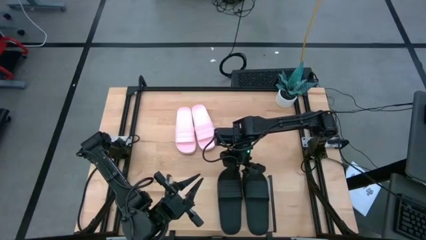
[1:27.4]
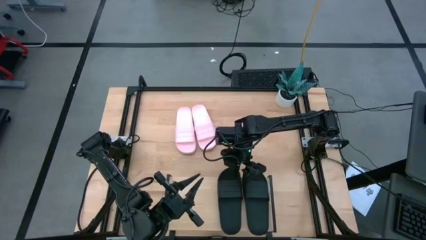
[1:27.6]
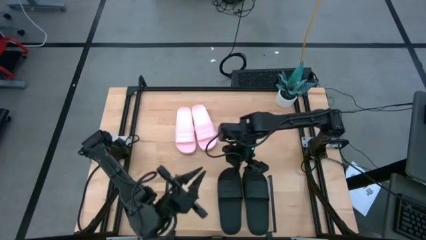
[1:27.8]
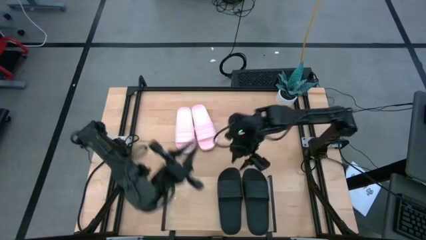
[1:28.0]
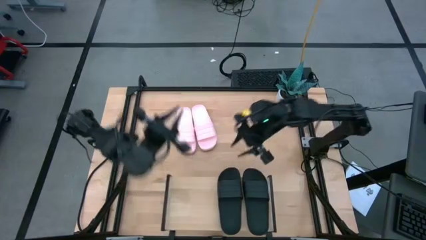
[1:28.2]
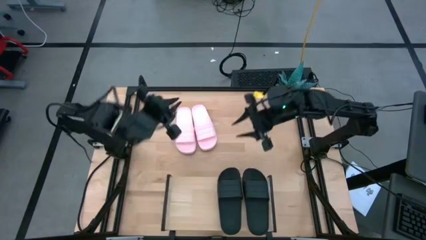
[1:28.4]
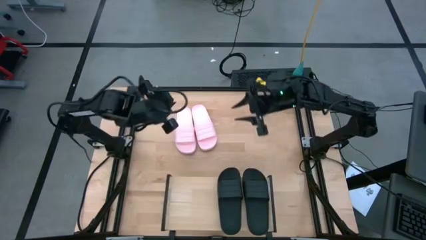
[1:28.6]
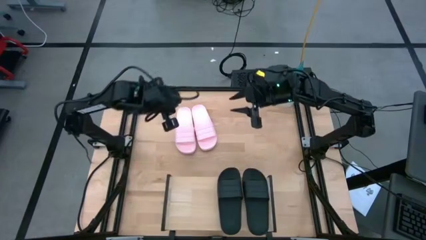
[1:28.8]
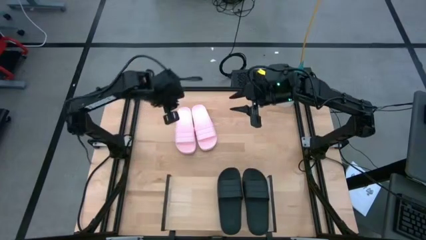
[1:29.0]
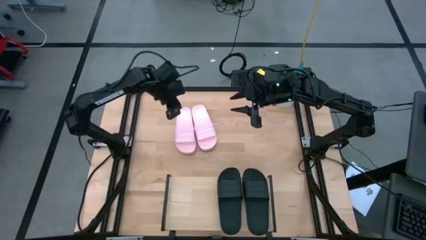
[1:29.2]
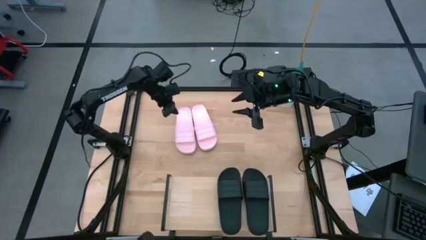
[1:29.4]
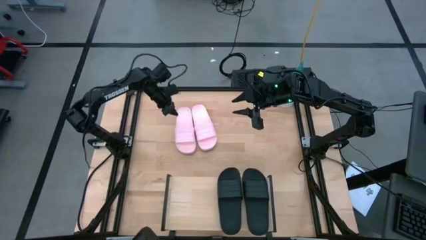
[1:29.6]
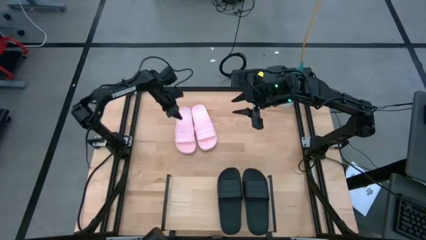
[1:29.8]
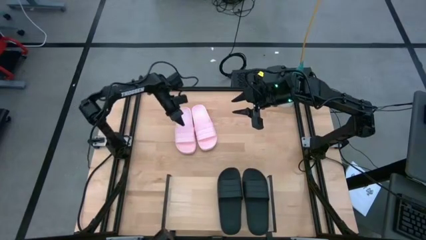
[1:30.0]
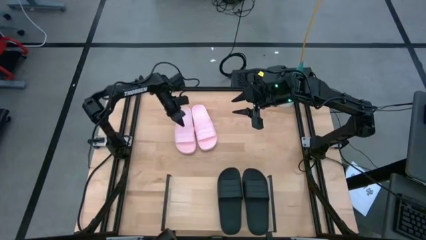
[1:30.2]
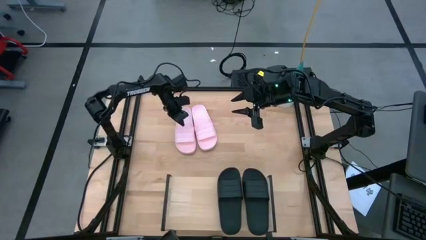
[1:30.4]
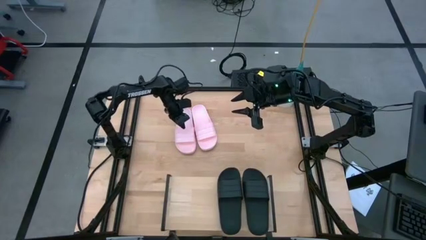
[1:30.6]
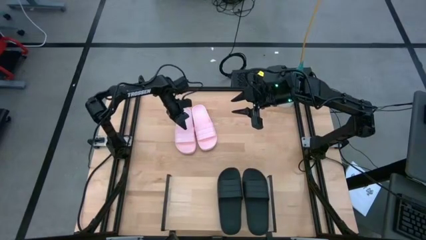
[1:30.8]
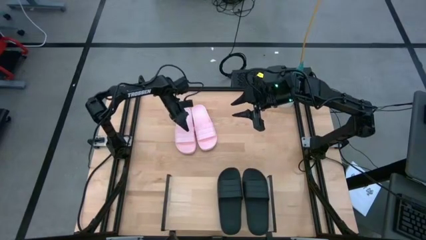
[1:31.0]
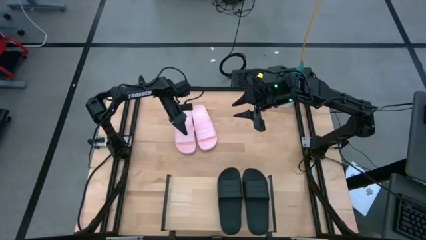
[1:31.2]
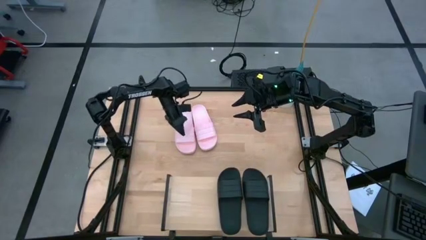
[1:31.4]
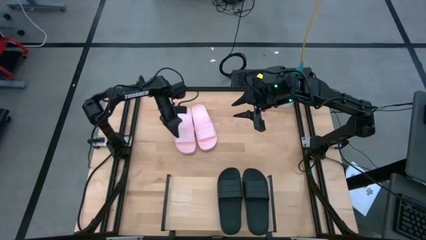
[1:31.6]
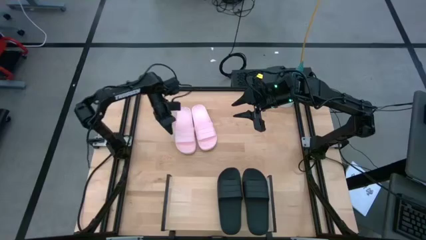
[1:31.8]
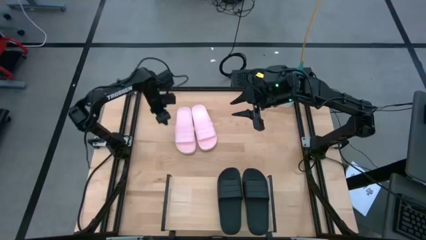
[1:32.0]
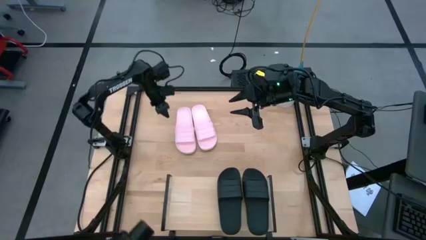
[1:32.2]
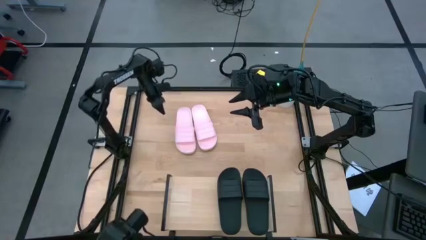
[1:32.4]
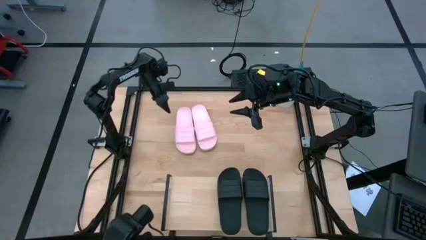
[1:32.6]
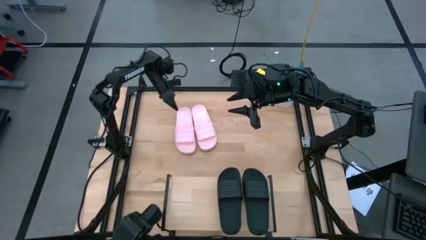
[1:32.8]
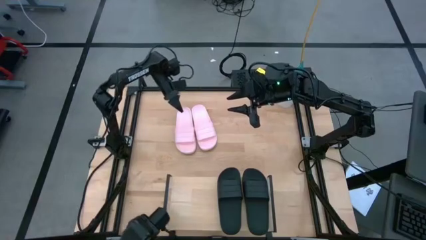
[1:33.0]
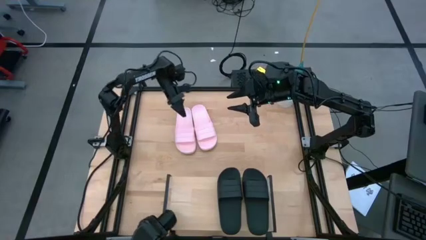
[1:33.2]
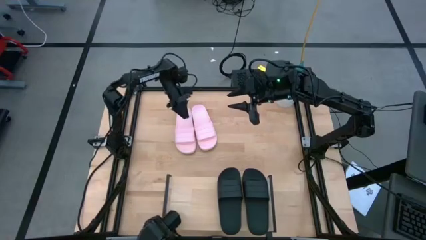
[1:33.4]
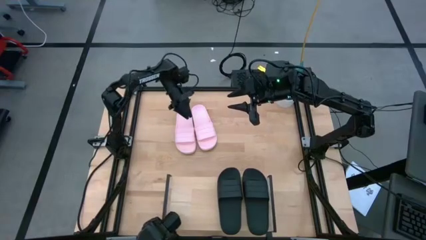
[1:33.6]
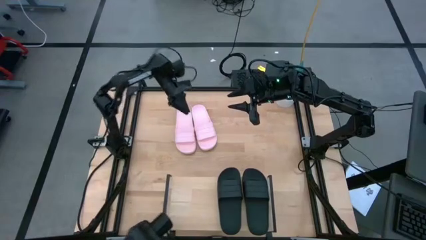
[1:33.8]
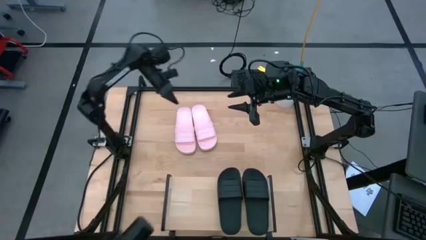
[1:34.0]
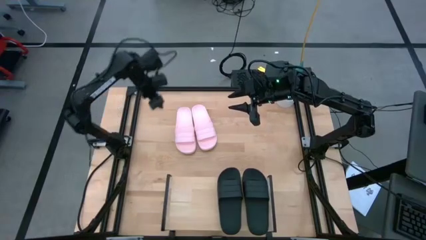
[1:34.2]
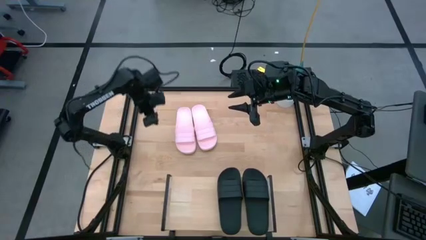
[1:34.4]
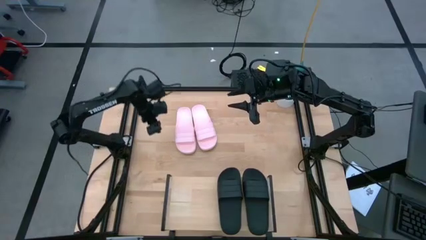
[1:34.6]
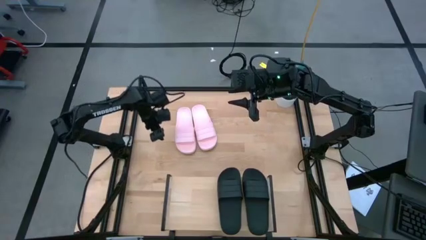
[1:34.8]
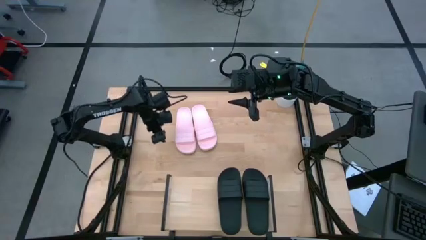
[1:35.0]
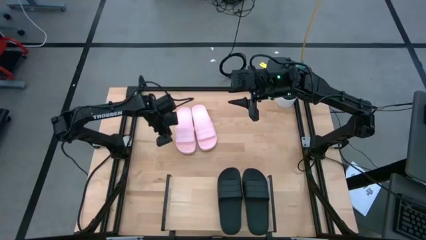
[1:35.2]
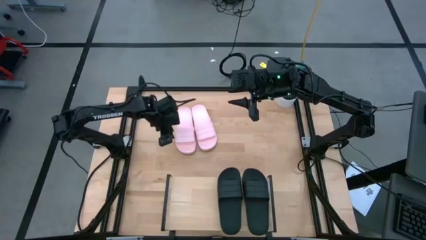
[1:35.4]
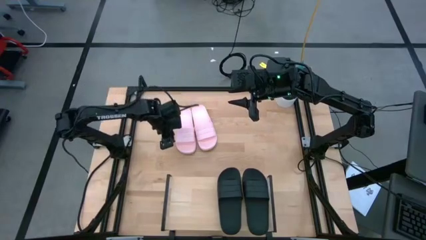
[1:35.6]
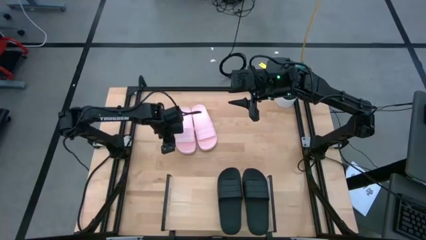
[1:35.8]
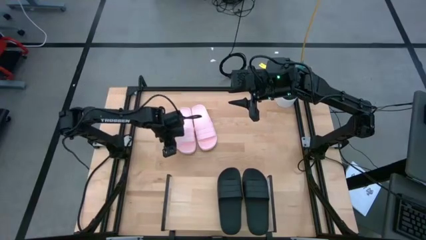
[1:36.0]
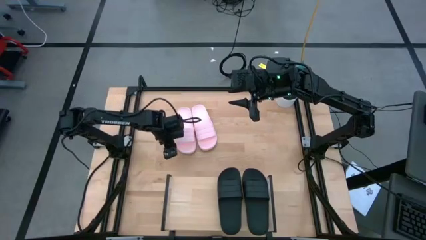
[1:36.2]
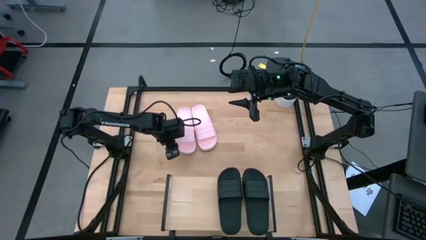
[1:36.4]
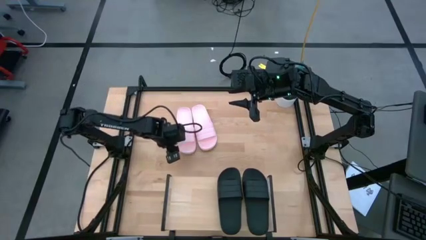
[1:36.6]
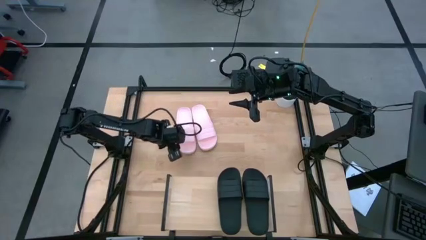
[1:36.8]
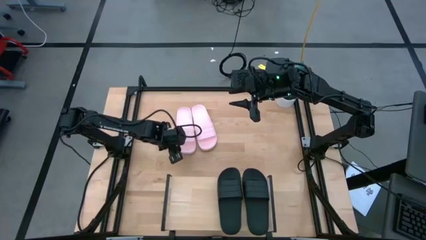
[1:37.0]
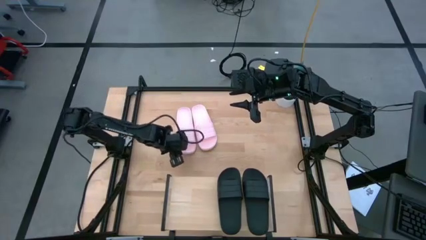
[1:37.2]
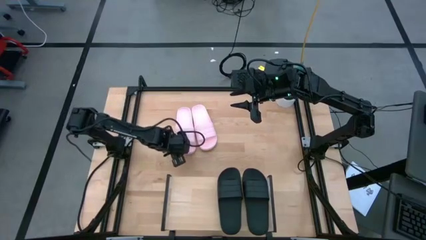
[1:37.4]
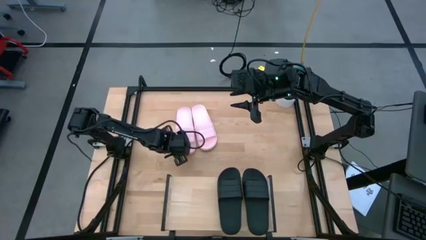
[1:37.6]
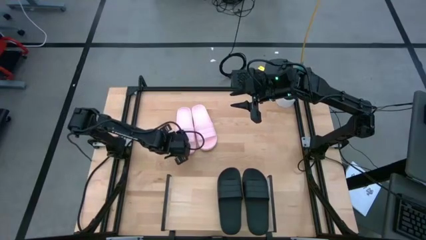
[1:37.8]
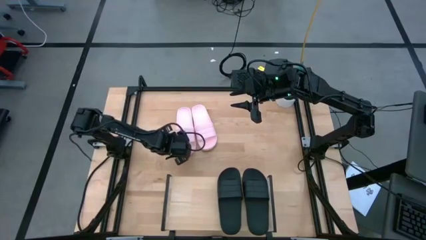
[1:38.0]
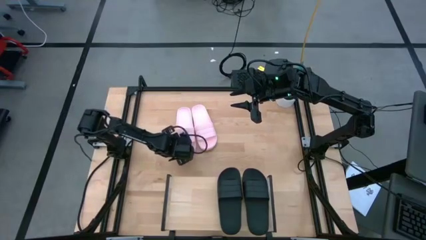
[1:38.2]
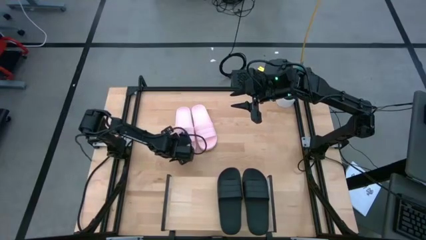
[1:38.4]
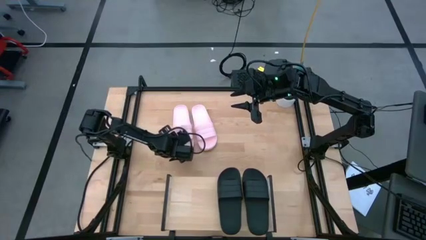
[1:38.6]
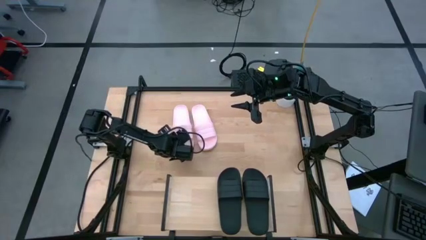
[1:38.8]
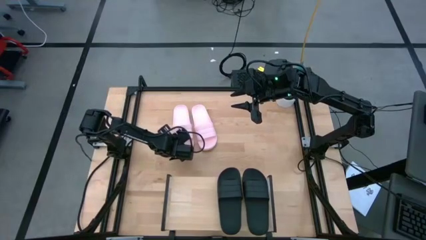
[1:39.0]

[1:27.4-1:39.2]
Task: Pick and place slides into the shelf
Put the left pink slipper on the shelf
